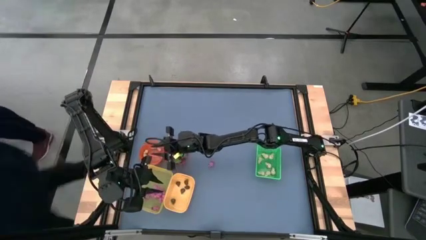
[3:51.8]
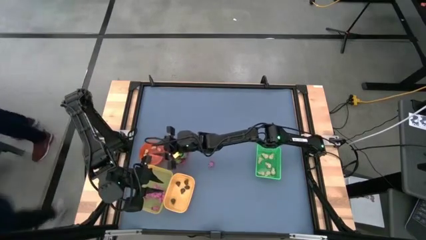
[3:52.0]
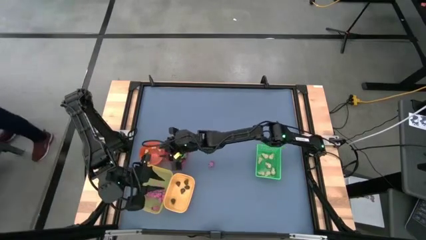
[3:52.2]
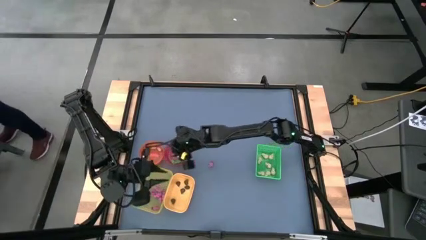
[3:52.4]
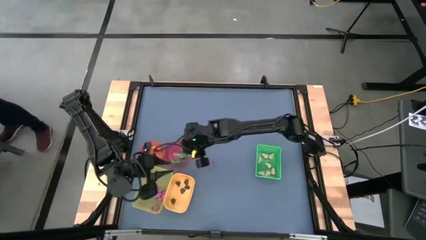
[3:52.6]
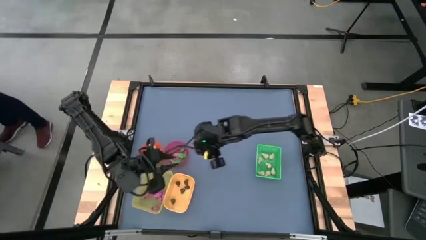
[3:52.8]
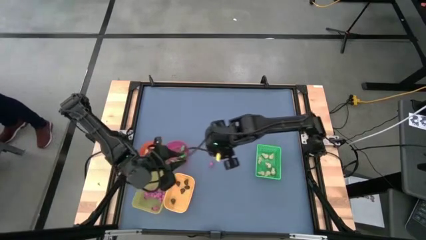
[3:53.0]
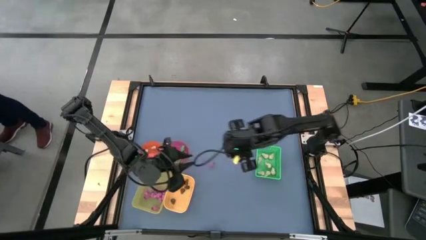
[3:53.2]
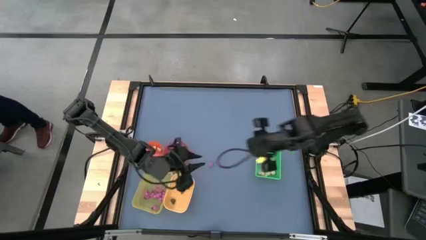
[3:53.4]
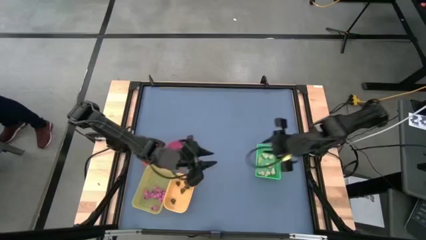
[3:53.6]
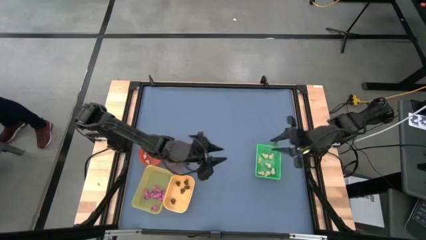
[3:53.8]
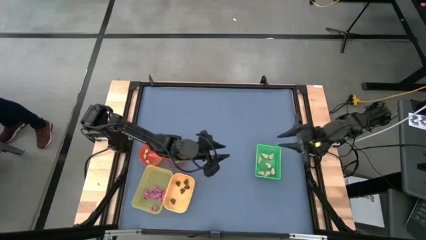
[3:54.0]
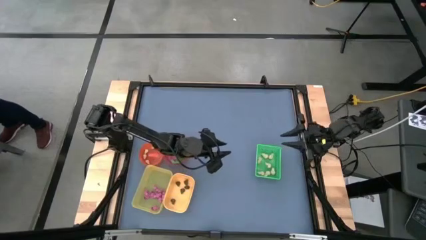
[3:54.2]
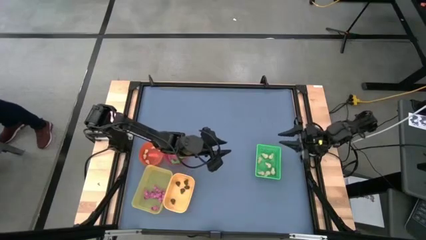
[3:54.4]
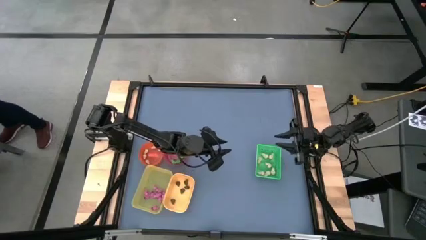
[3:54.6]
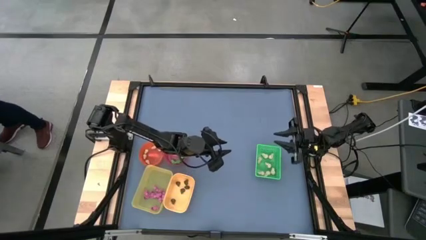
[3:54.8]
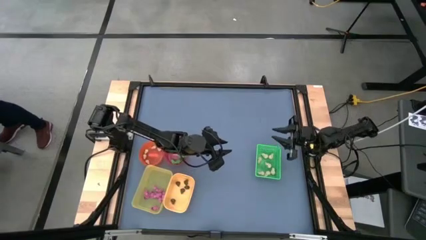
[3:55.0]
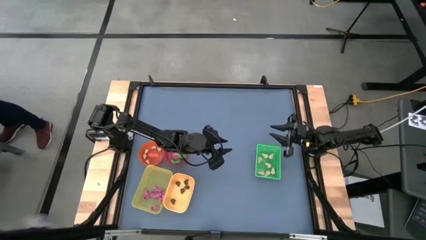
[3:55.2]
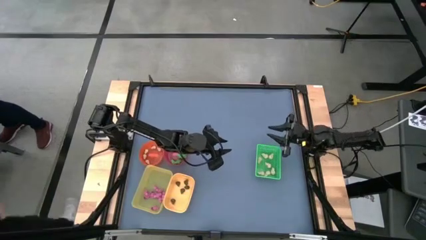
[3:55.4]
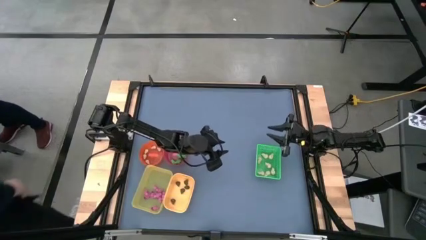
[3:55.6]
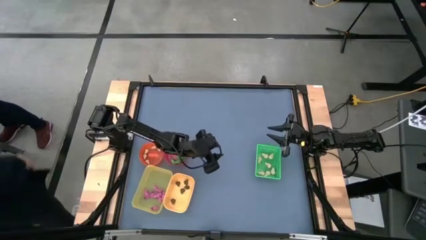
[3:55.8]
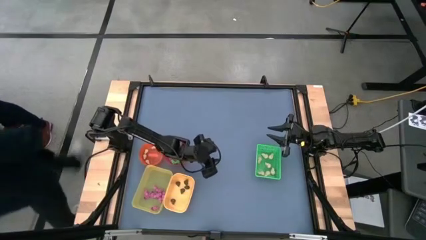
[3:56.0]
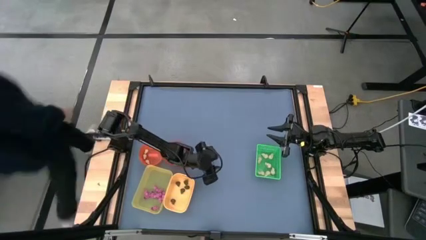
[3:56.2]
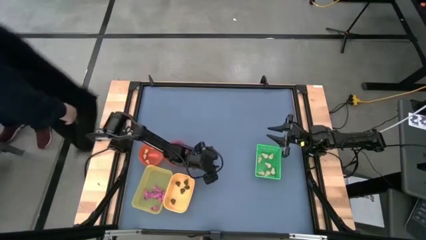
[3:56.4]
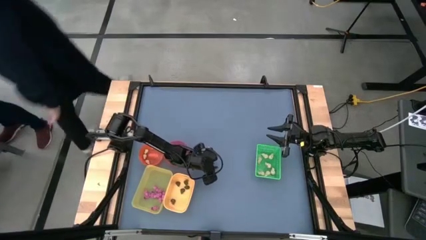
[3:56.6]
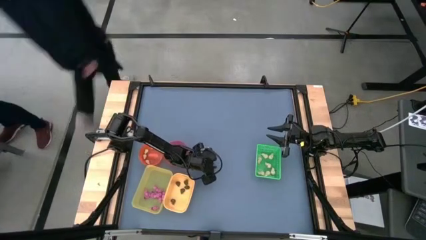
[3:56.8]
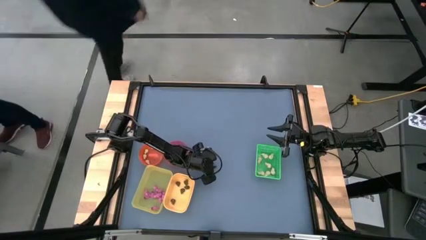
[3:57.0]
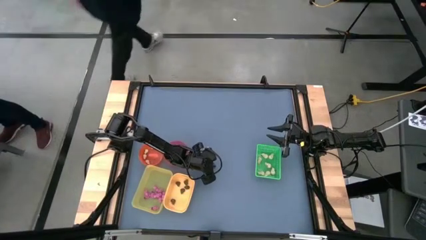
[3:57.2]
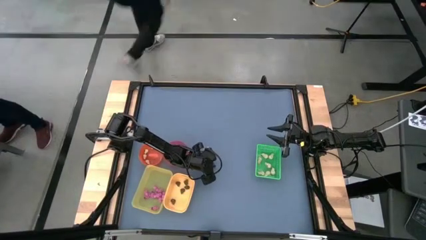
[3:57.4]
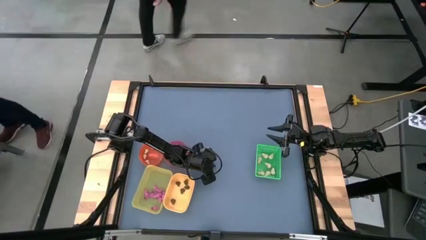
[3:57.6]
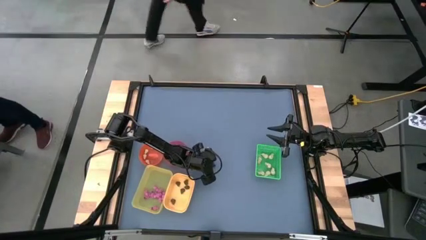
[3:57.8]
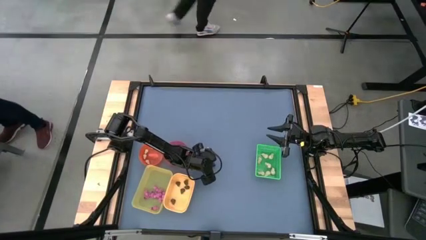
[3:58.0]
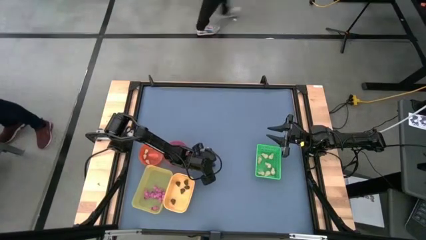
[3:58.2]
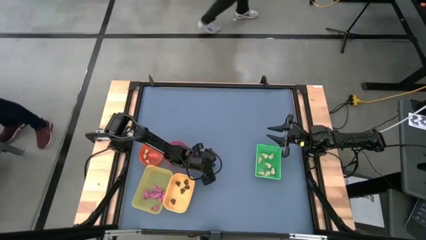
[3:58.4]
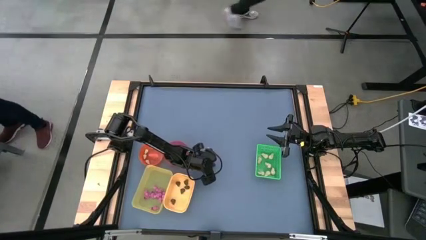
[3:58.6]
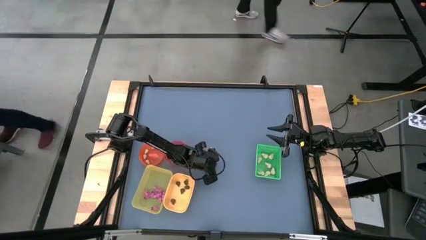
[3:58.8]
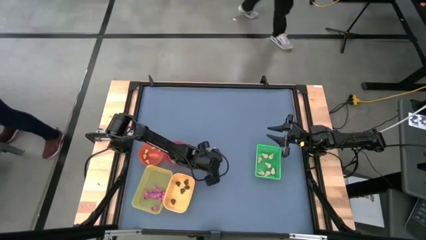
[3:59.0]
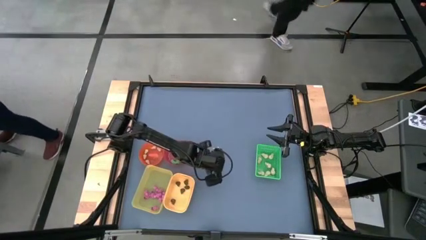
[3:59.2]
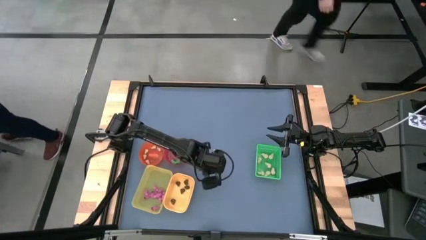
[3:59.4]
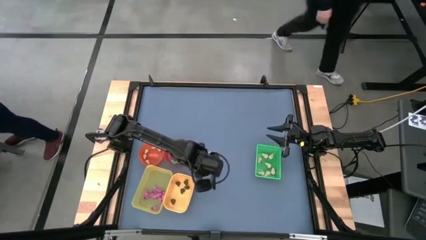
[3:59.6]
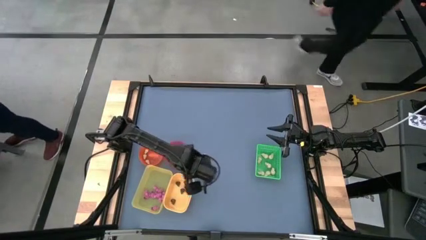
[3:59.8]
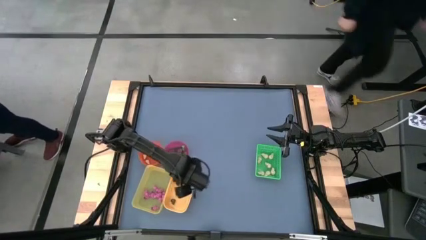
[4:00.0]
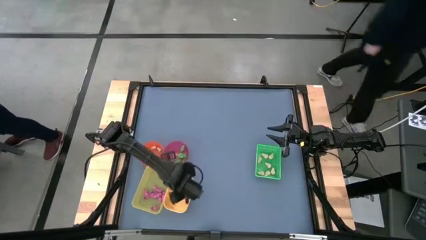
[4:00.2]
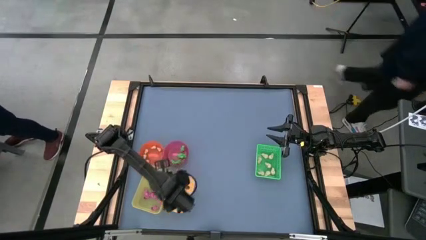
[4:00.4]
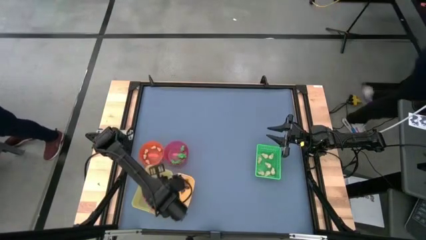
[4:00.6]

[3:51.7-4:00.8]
Task: Sort Halloween decoration
Put the pink skeleton toy into the light yellow bin

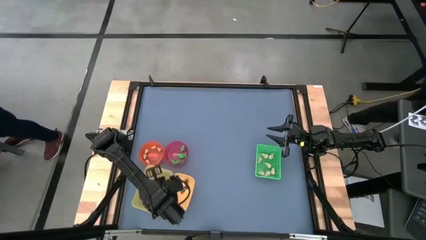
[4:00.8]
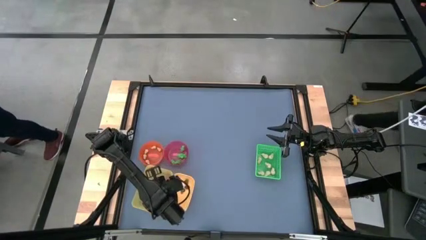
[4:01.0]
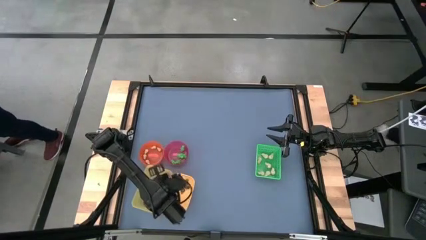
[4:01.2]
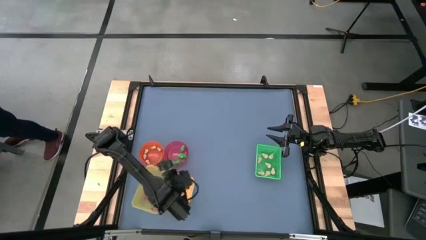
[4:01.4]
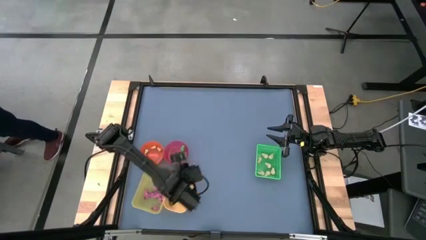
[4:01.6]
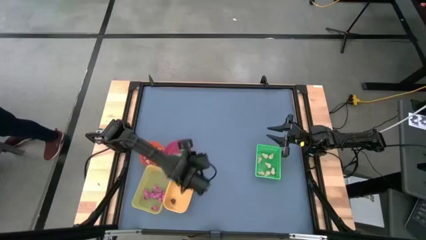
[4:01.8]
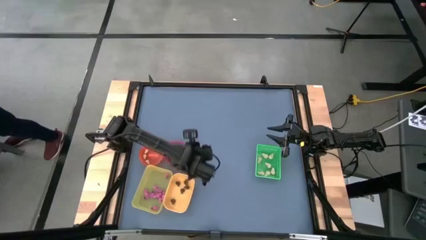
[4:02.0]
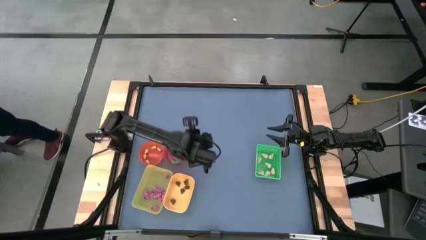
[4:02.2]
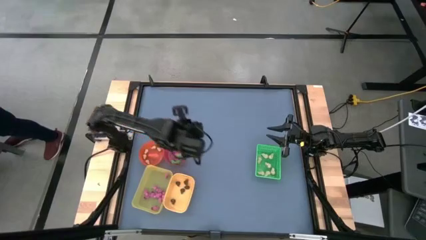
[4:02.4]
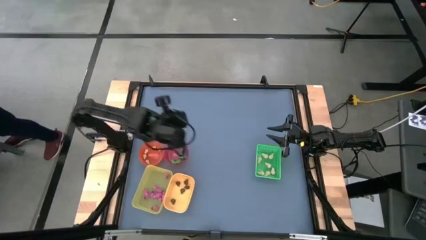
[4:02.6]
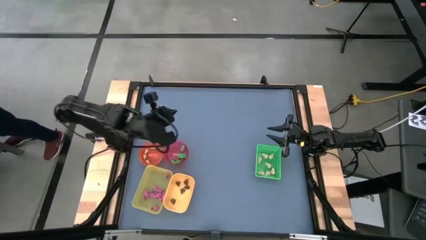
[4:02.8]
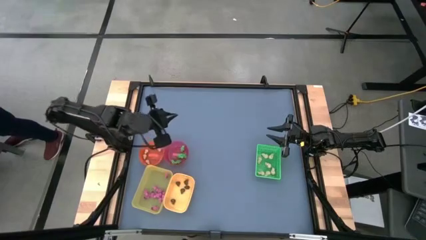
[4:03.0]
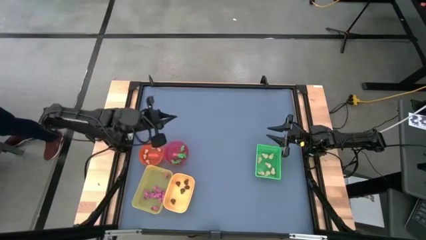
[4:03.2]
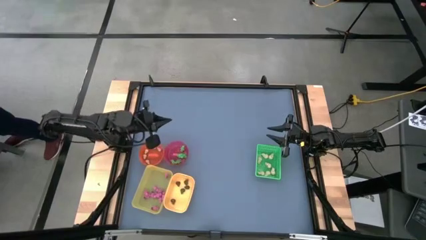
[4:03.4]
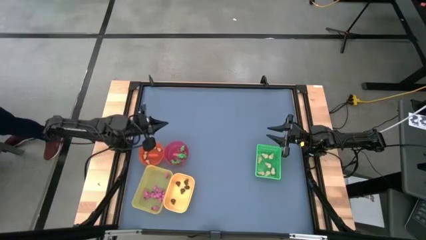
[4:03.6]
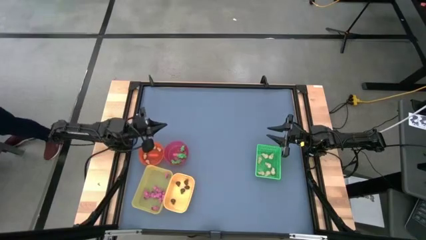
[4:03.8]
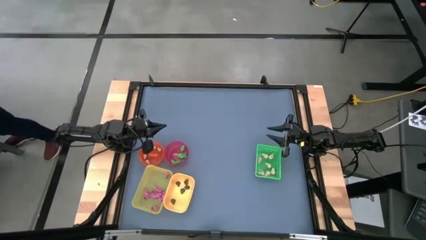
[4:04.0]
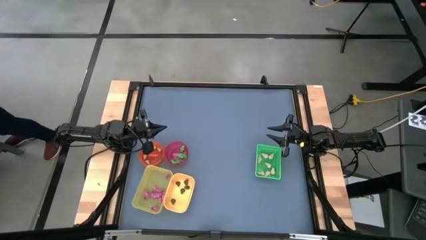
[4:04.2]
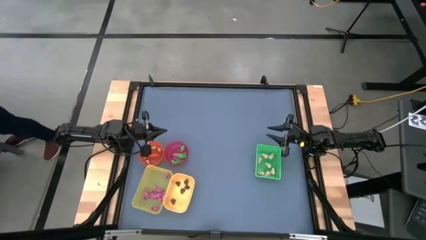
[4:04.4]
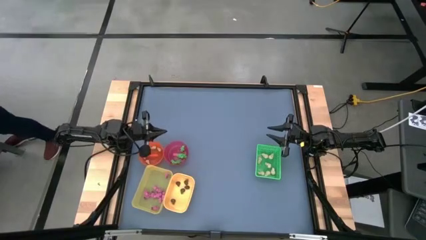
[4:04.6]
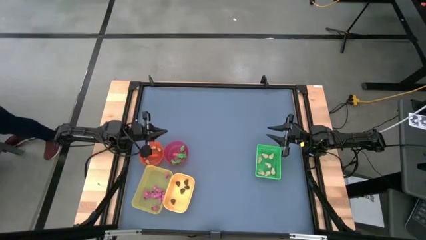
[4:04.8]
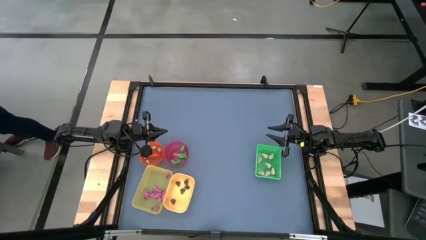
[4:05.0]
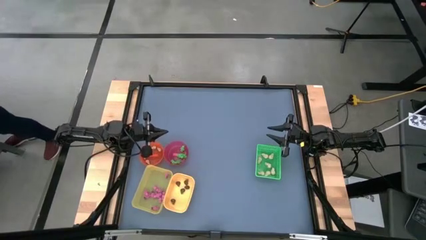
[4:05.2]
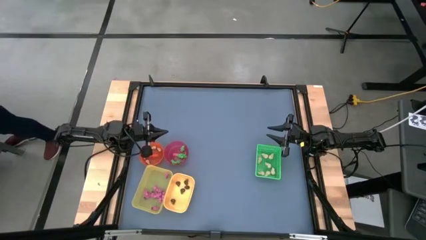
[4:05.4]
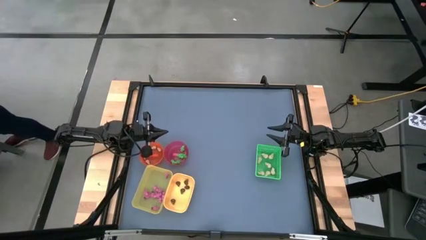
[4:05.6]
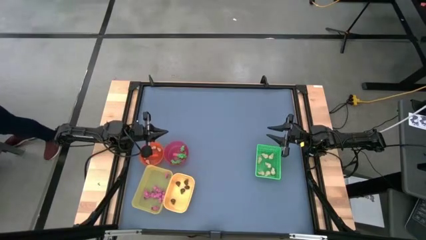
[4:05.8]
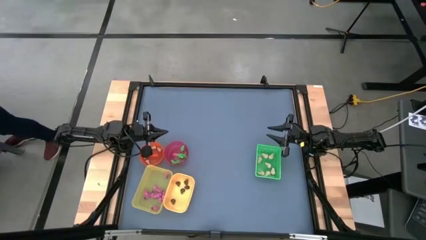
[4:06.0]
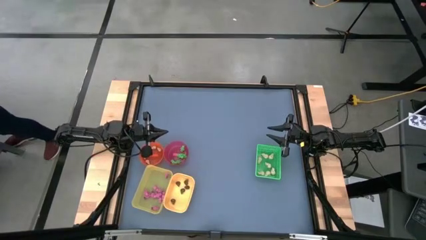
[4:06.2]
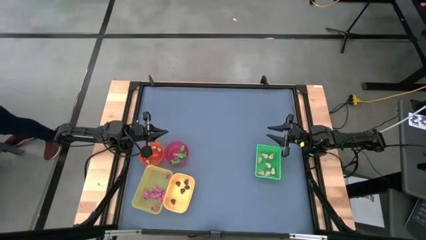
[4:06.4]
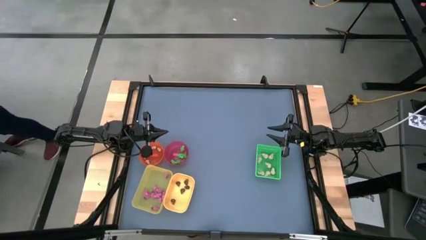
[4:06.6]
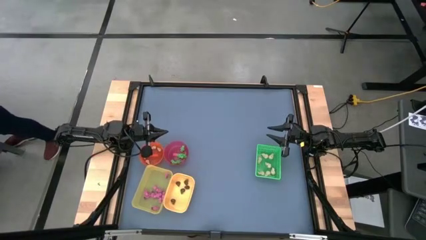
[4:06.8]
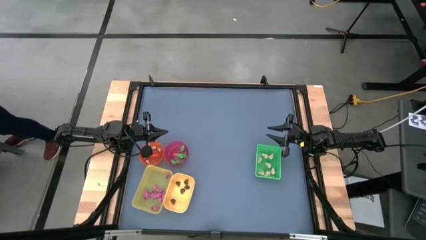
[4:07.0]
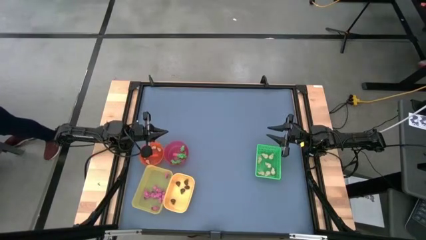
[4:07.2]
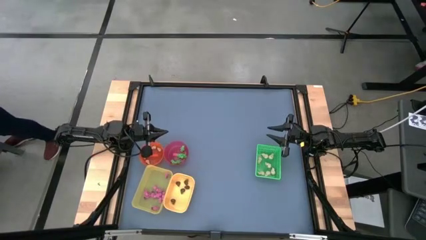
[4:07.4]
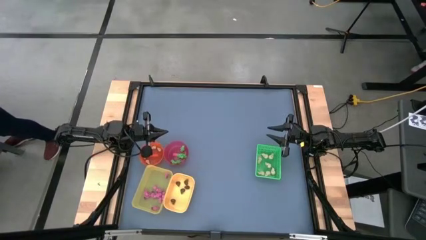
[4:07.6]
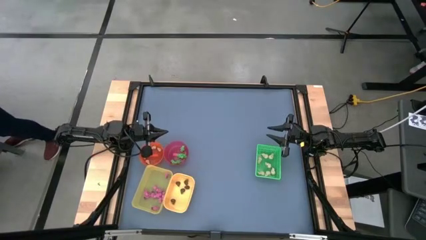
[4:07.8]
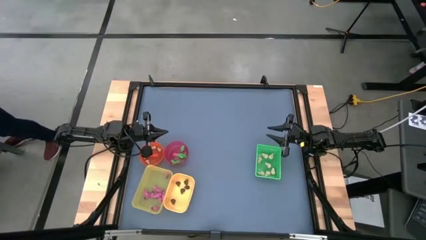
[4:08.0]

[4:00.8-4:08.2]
Return to Home Position
